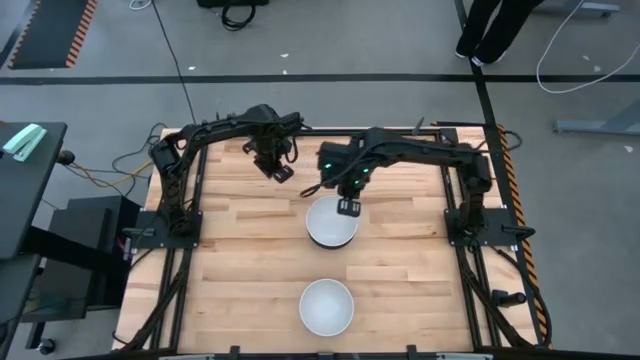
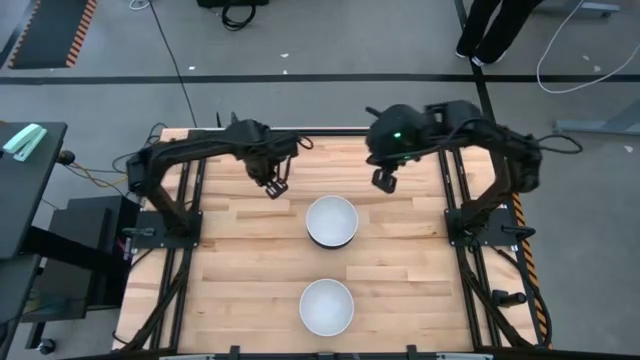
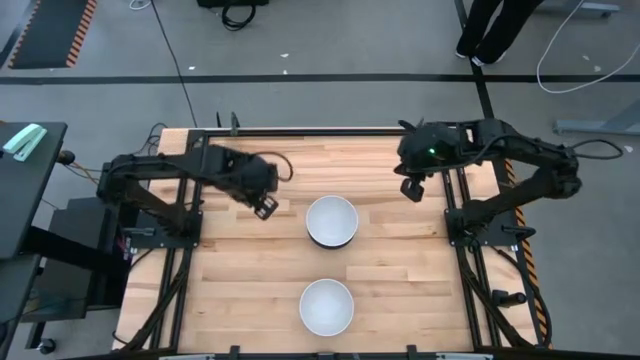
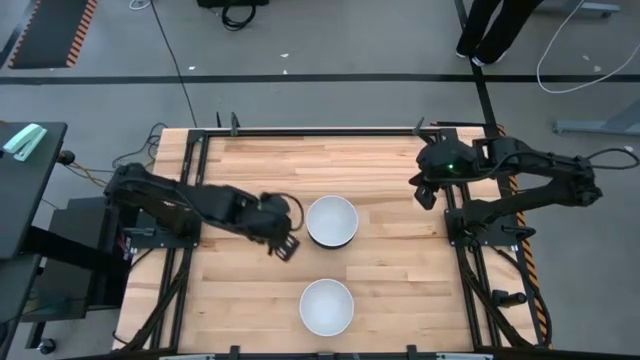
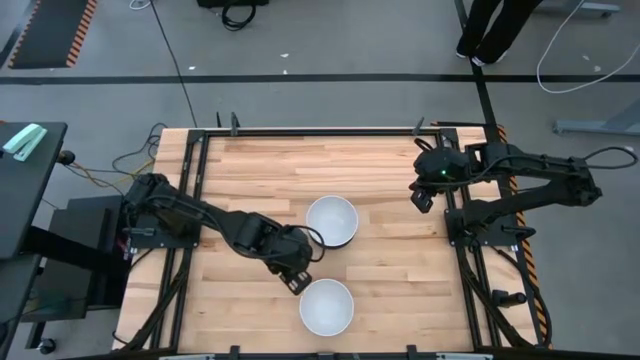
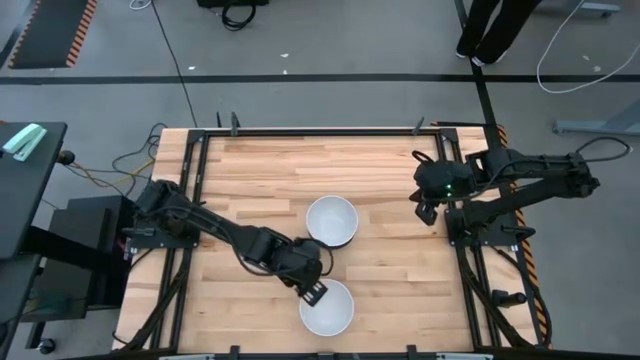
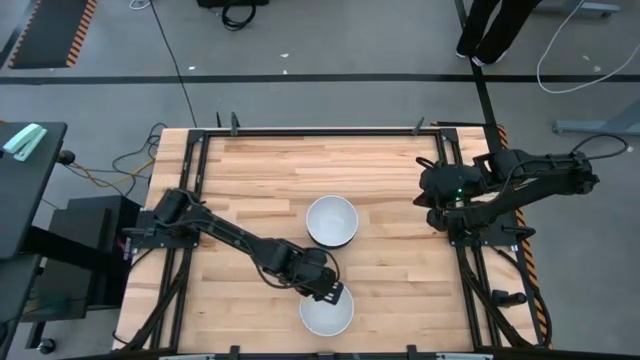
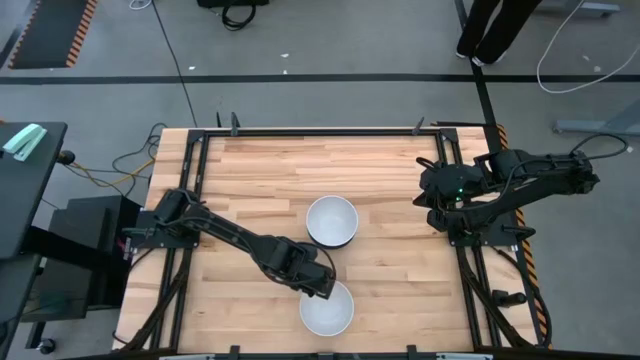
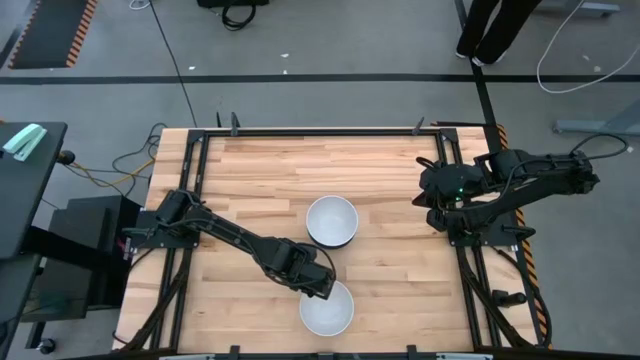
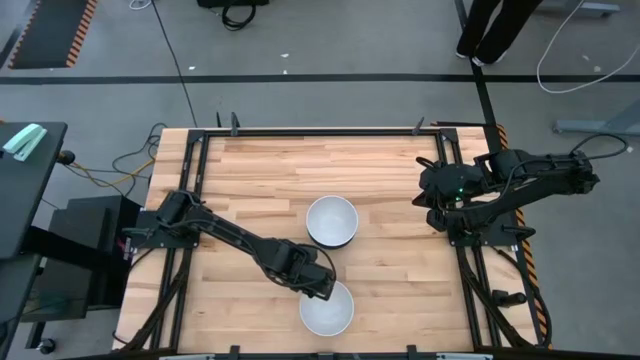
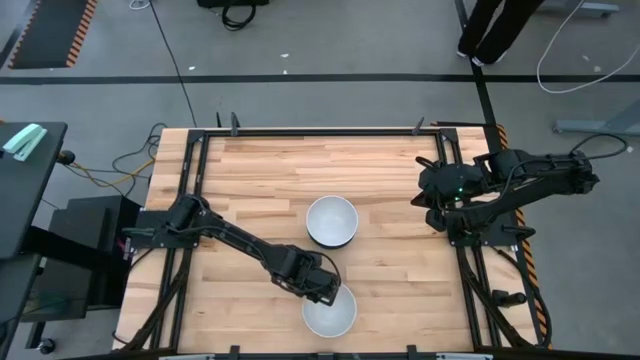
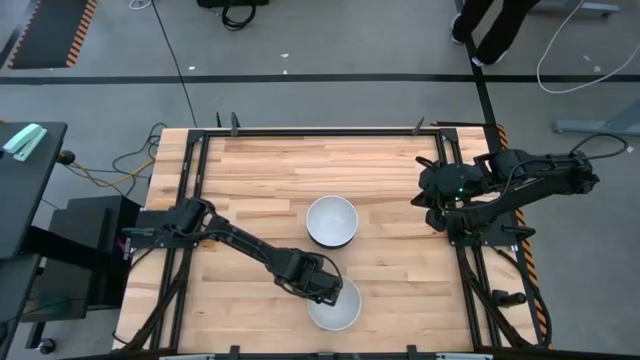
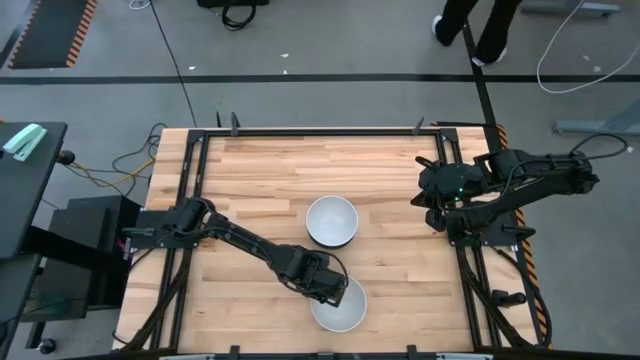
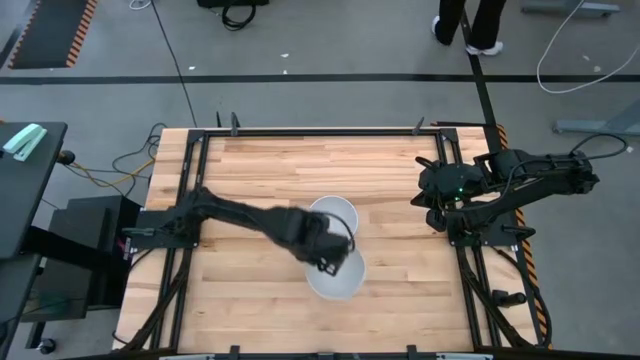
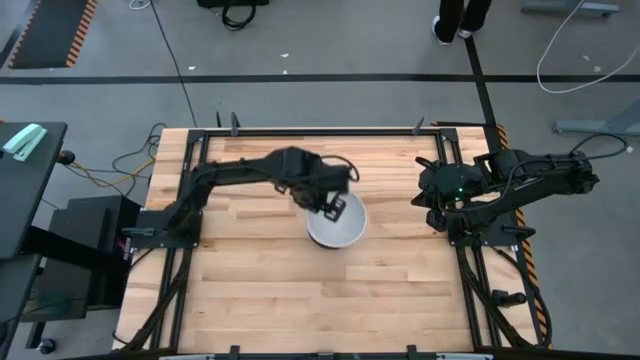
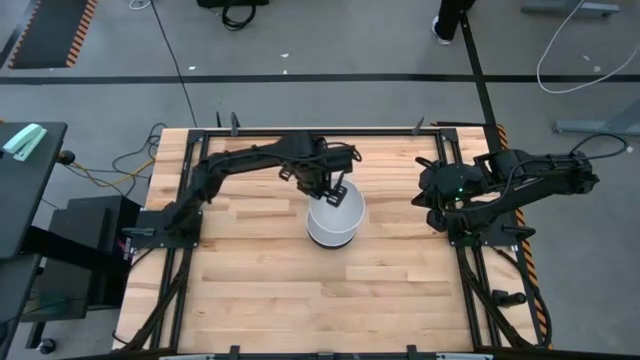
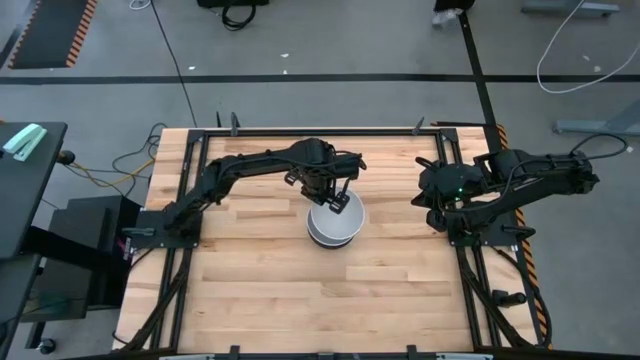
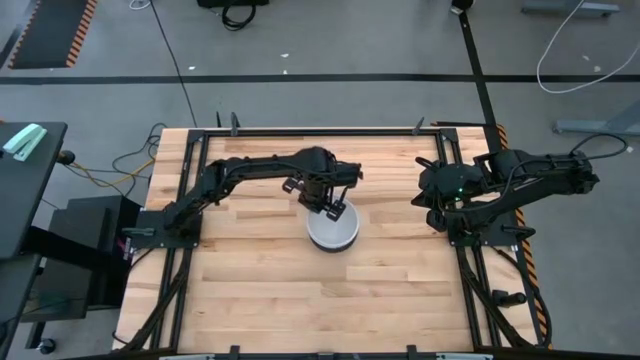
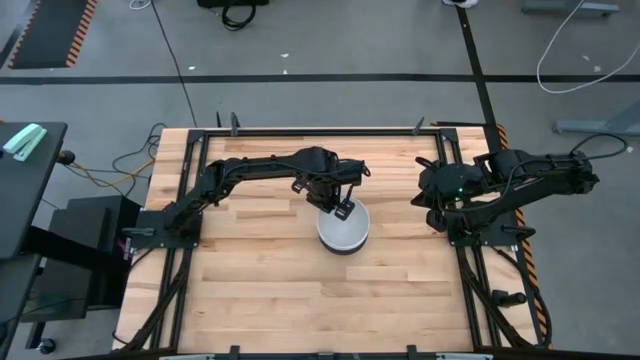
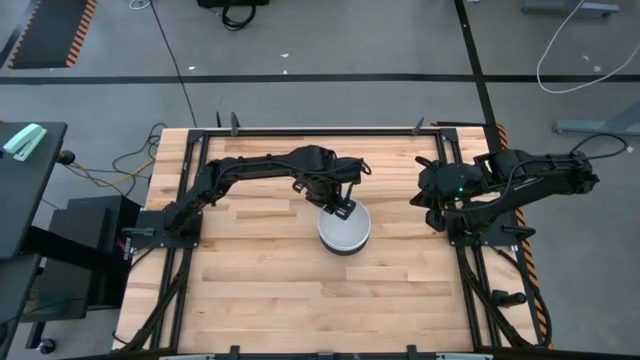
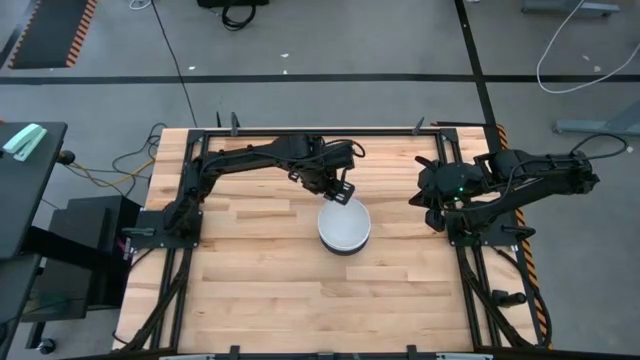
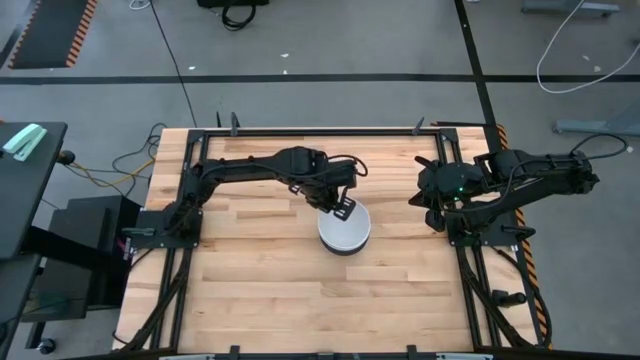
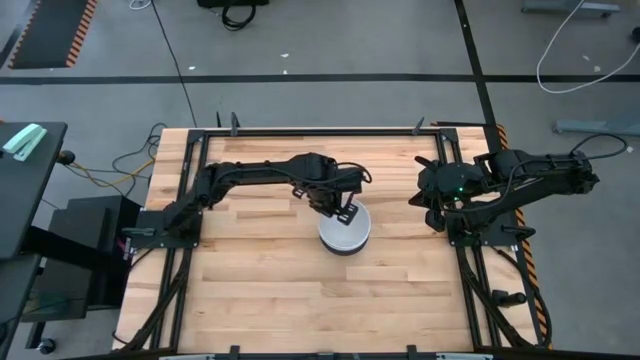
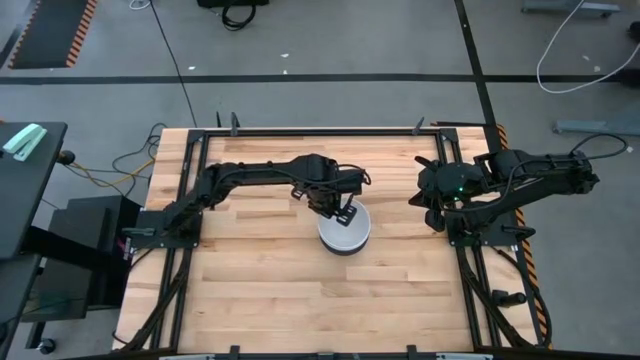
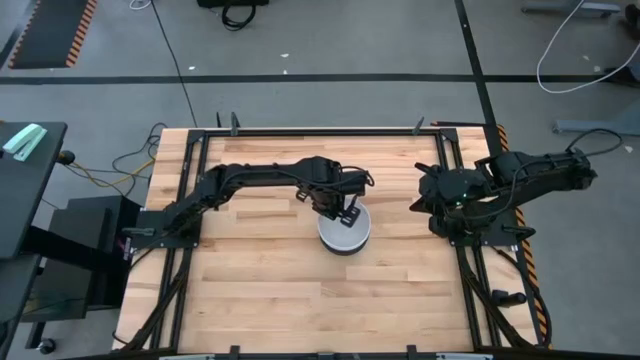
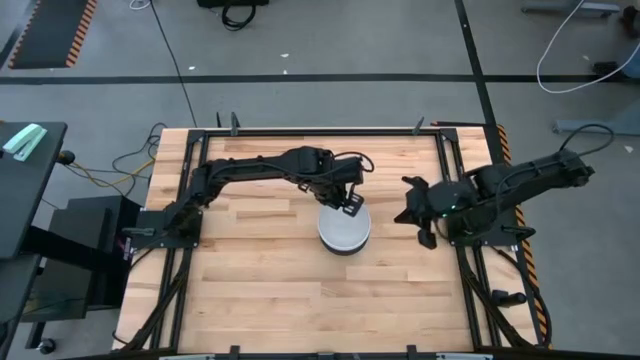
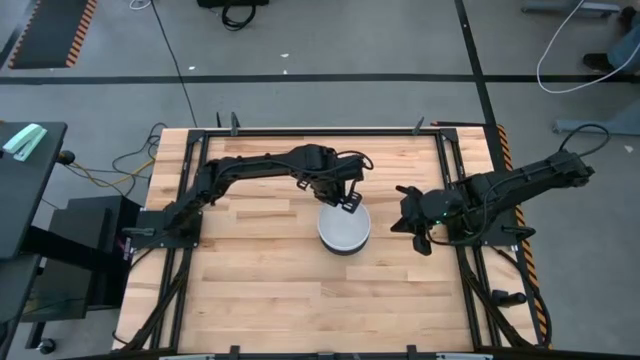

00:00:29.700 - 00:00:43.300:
Task: Nest bowls inside each other
Stack the bottom white bowl on top of the top white bowl

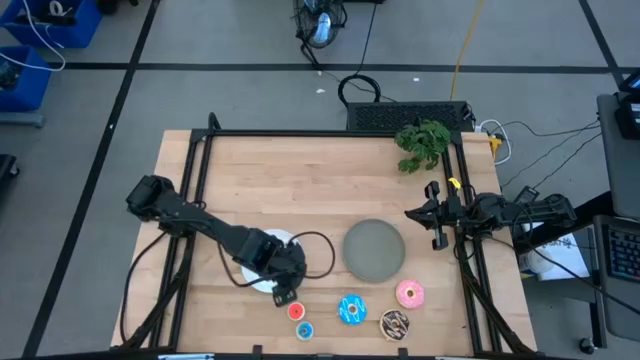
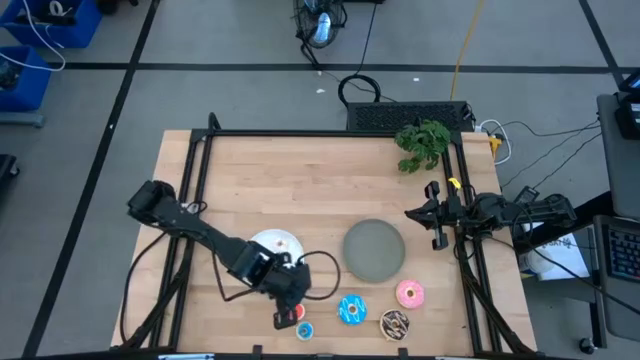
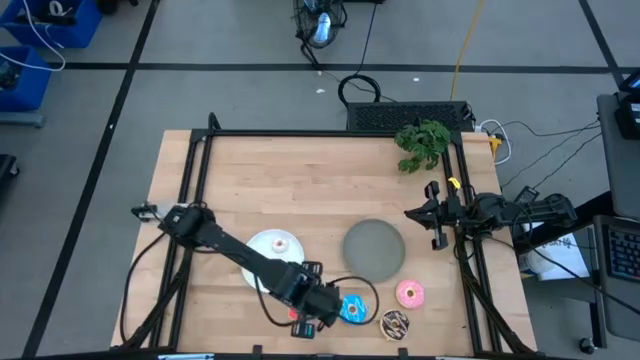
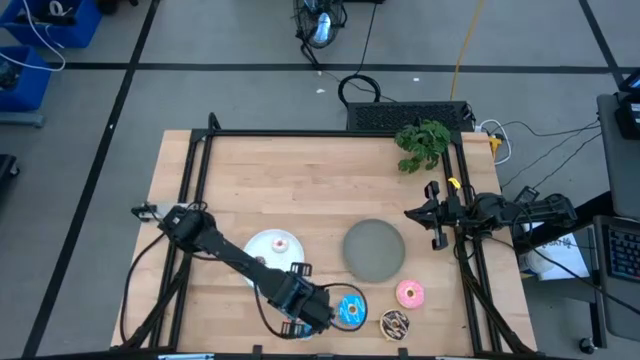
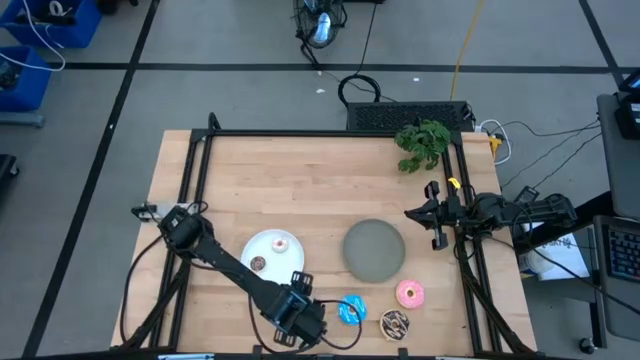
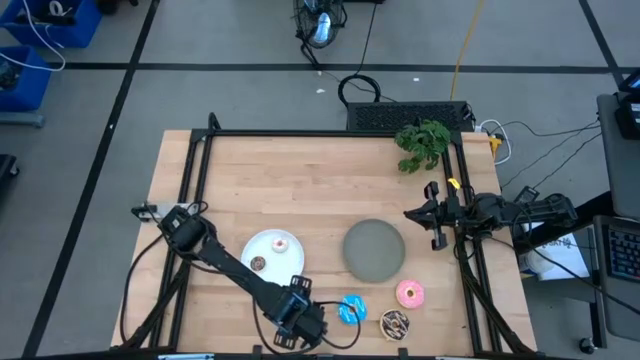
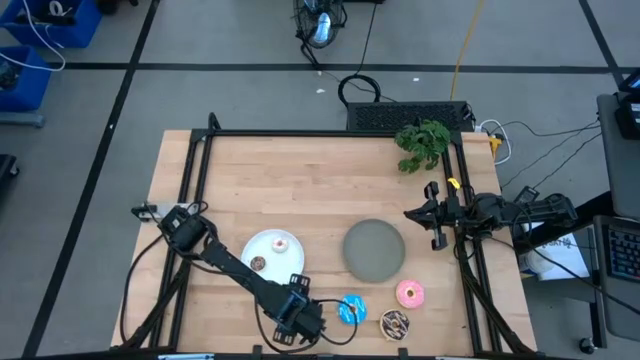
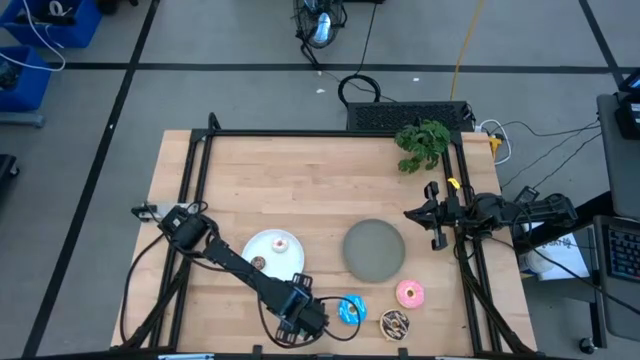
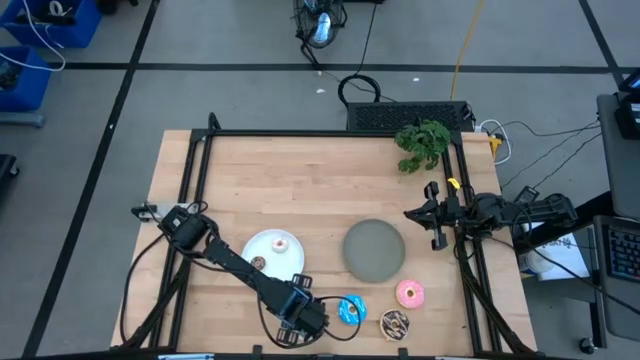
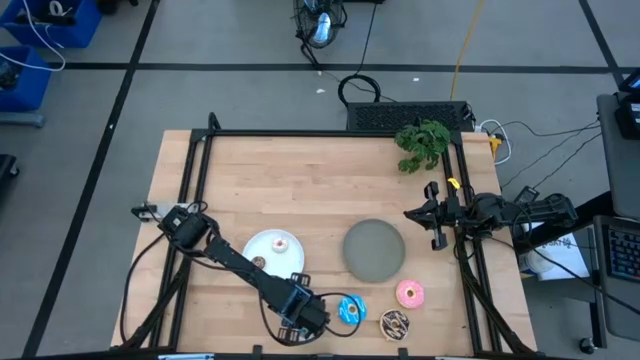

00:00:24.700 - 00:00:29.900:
Task: Pick & Place donuts
Put the small orange donut on the white plate

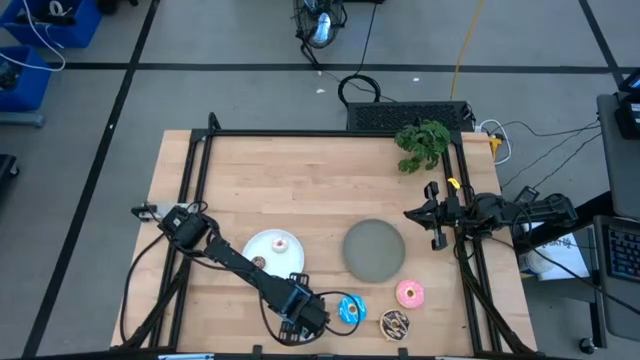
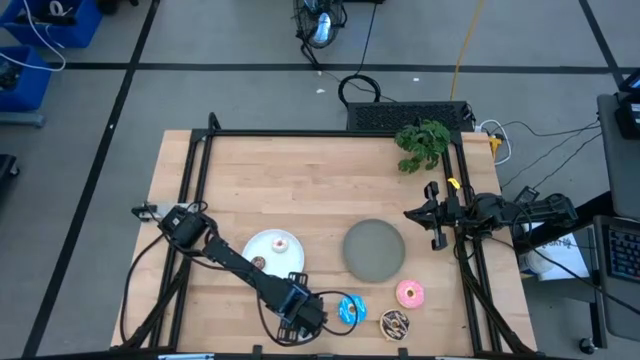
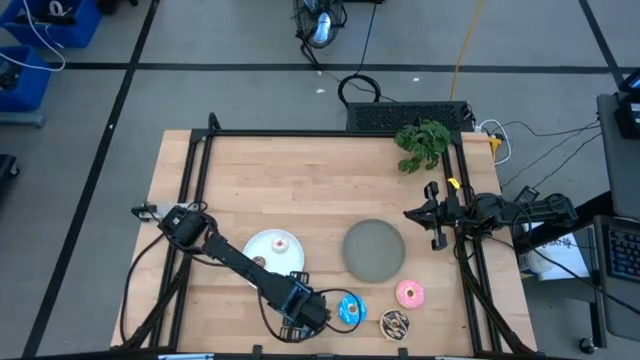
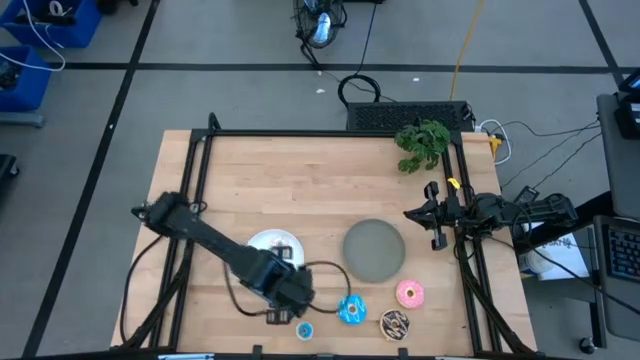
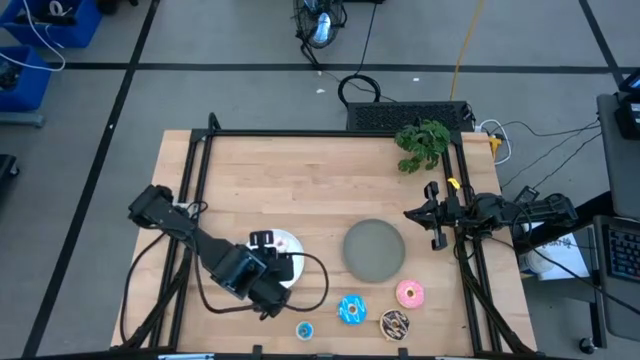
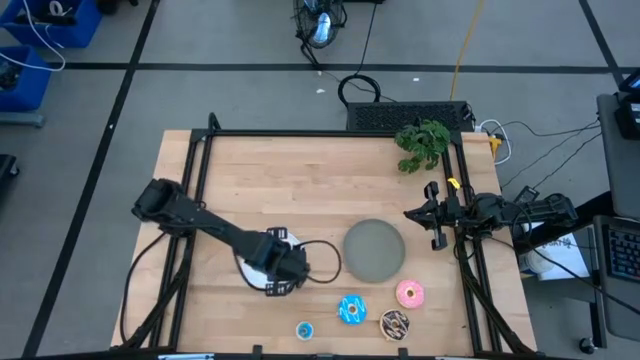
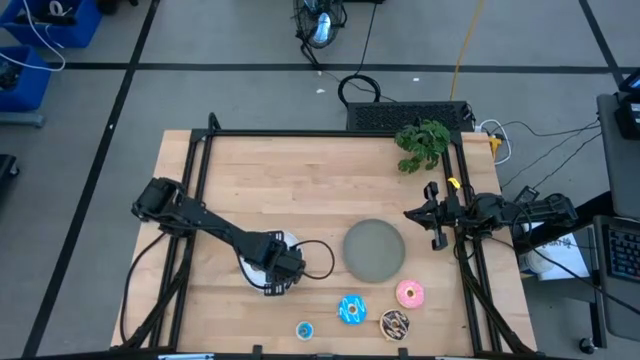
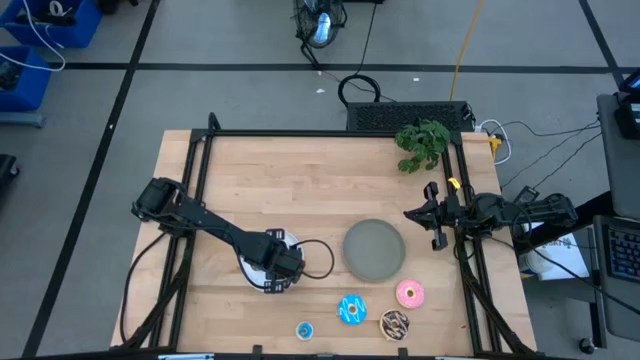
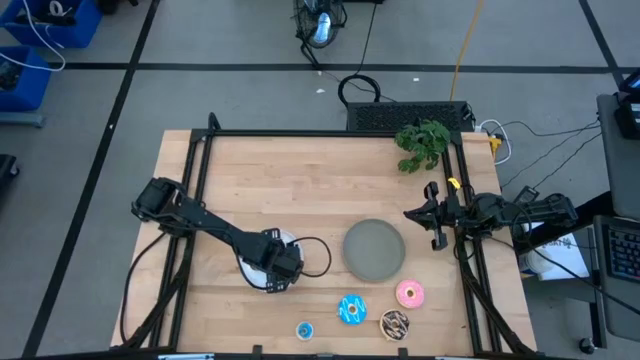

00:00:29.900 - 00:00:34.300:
Put the small orange donut on the white plate
